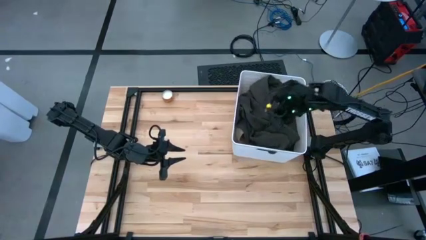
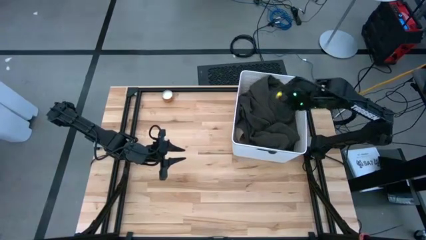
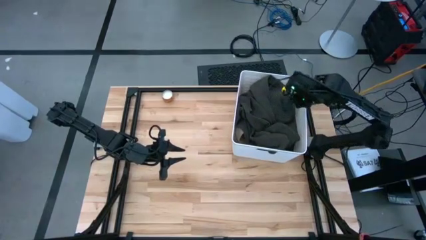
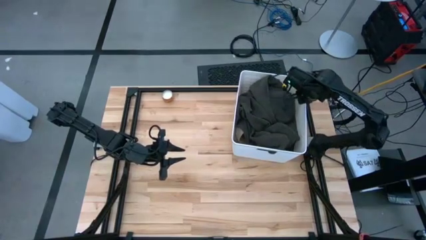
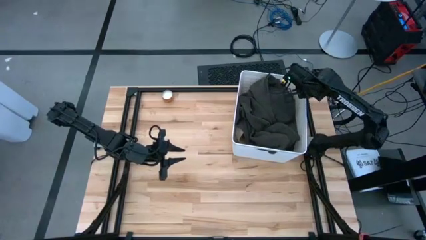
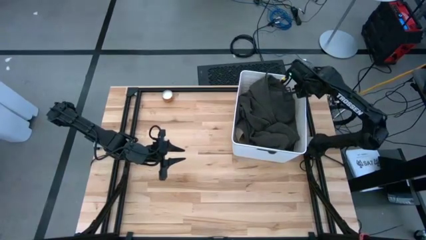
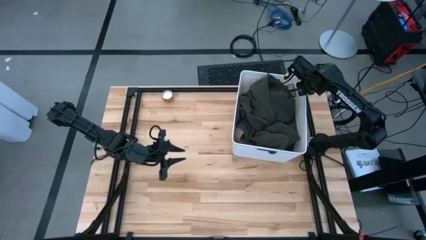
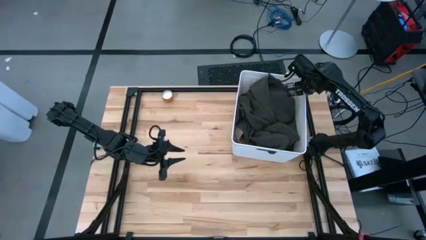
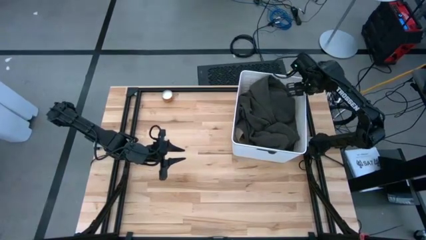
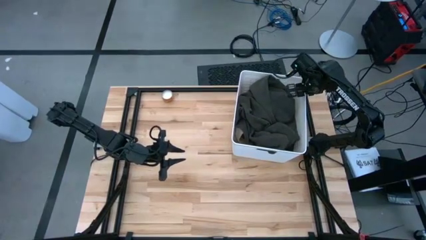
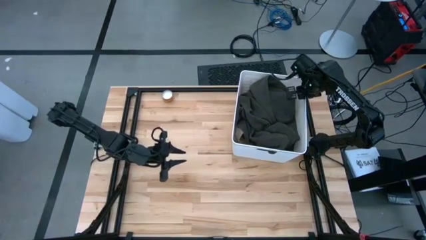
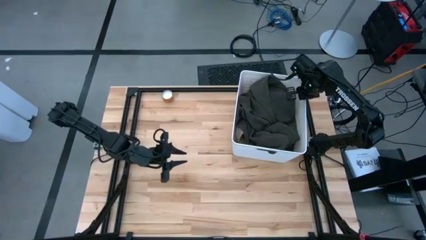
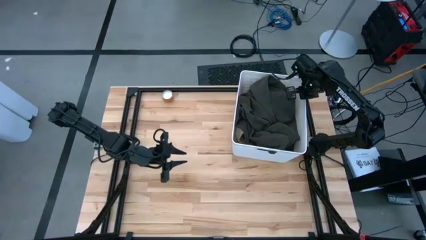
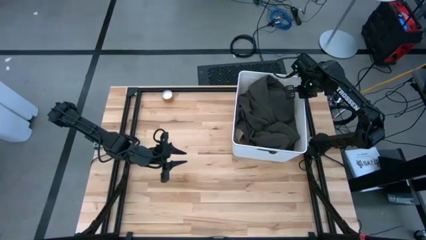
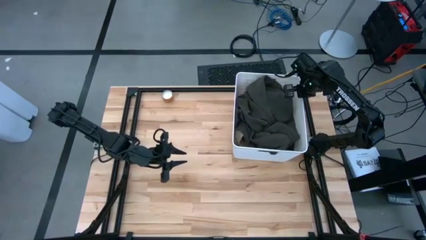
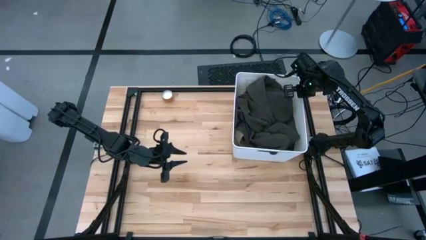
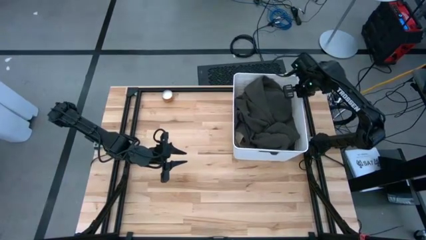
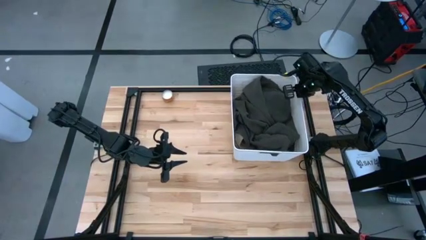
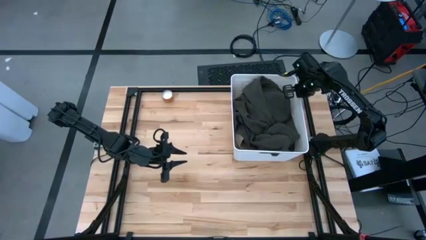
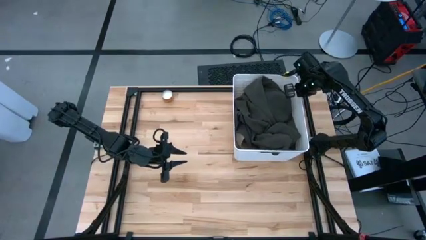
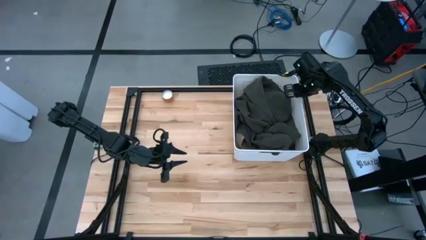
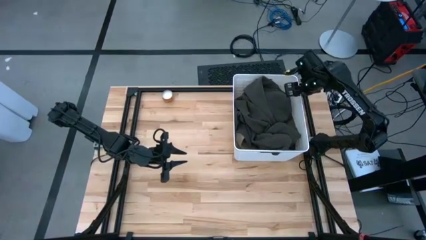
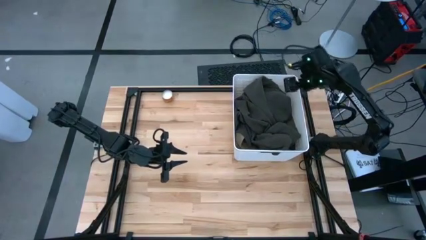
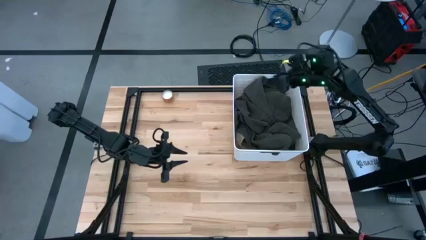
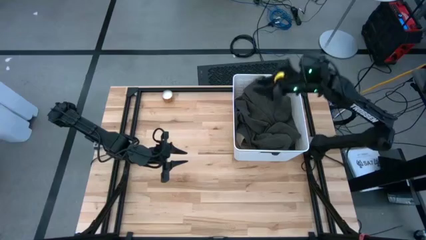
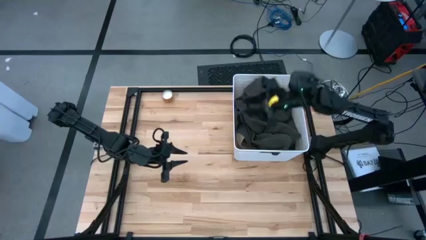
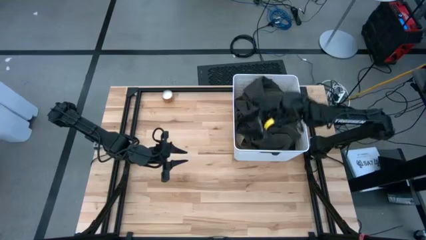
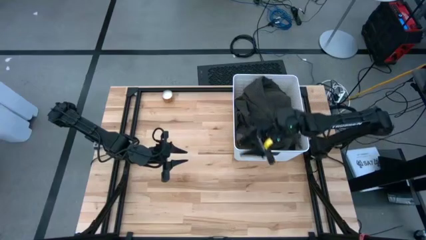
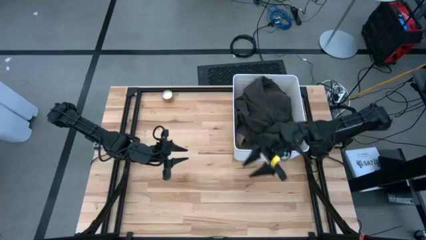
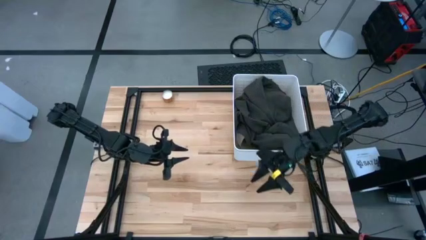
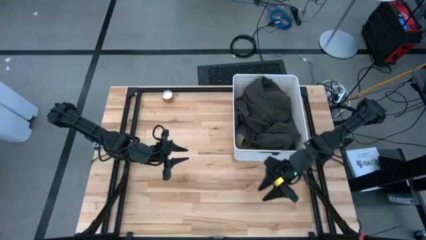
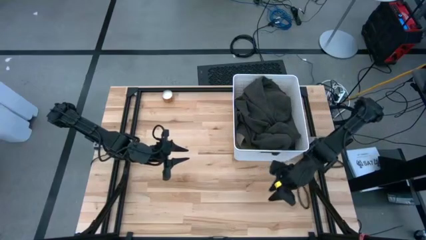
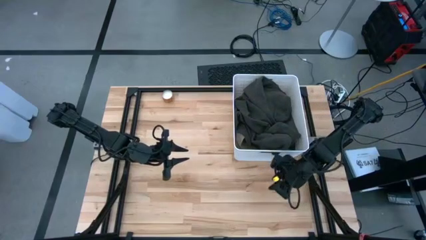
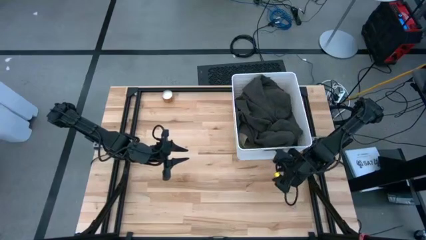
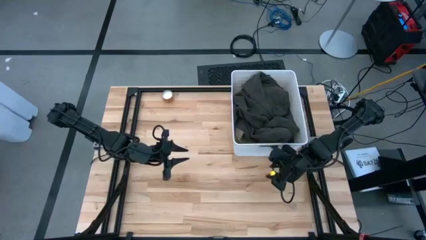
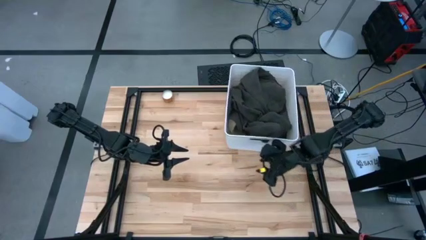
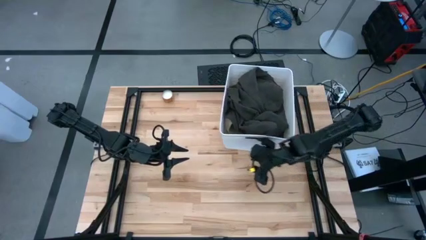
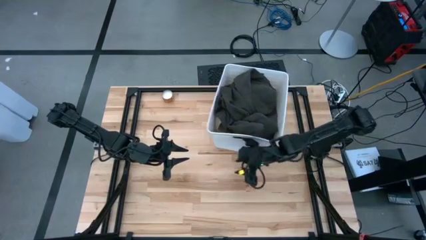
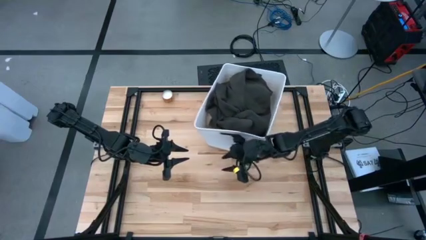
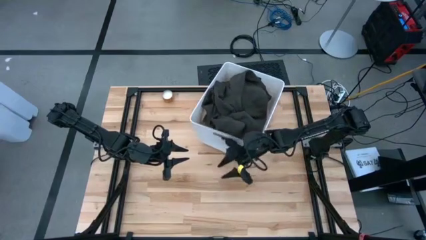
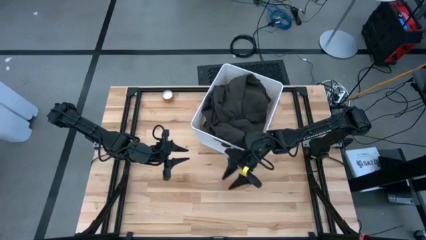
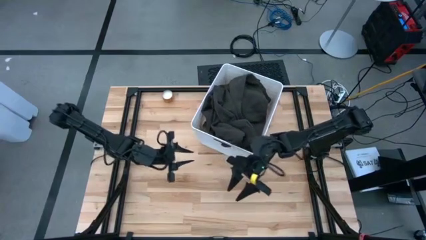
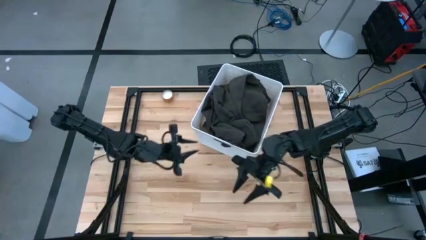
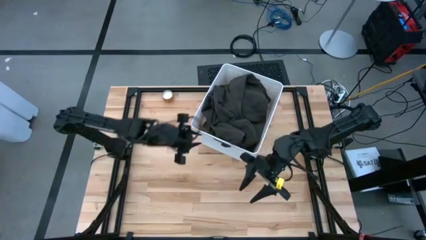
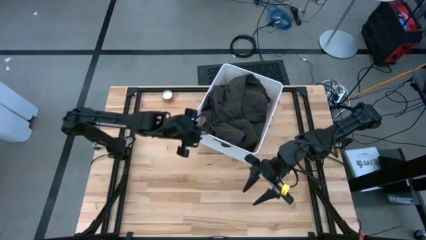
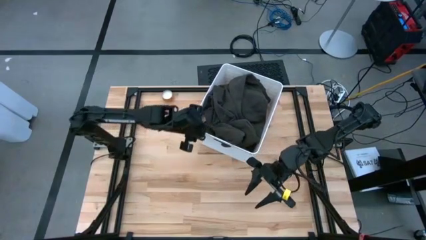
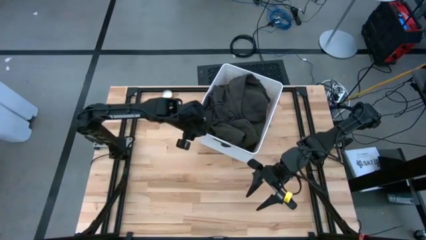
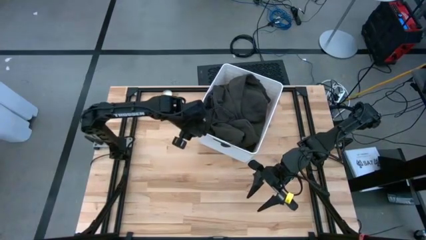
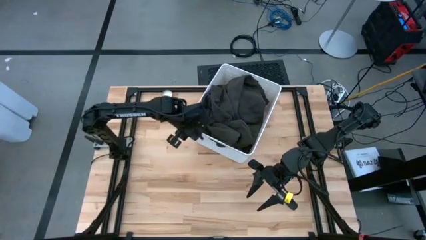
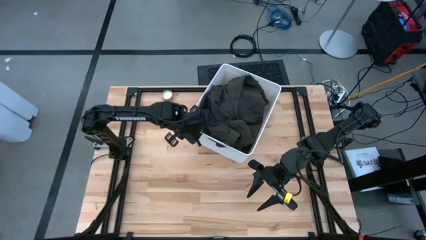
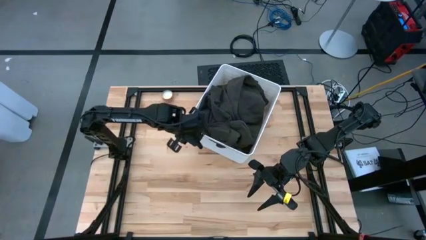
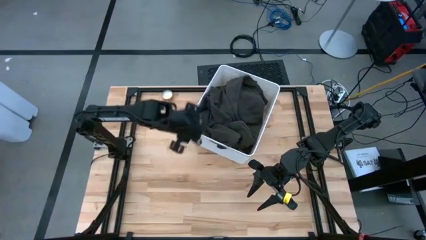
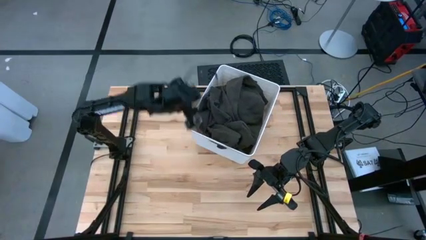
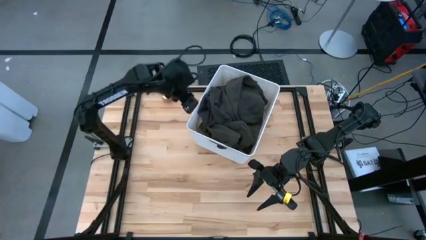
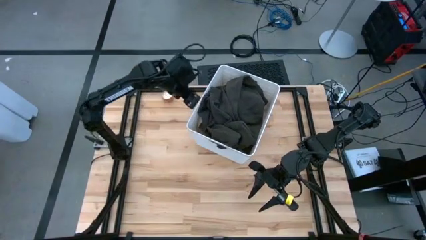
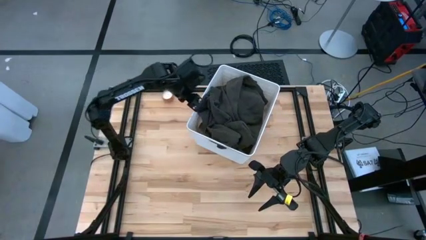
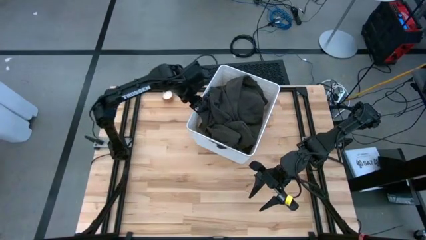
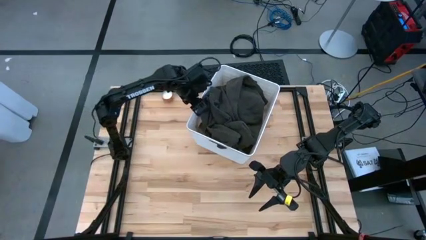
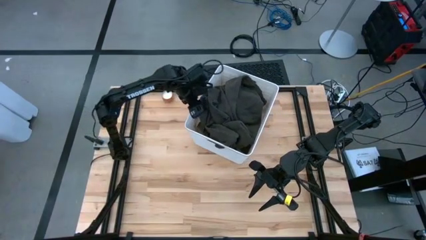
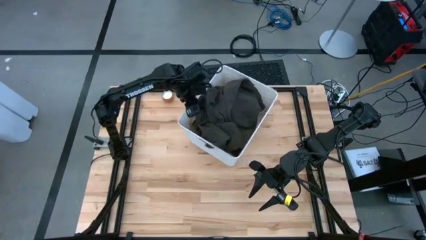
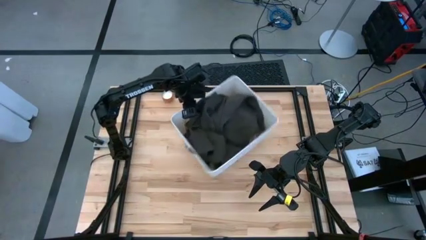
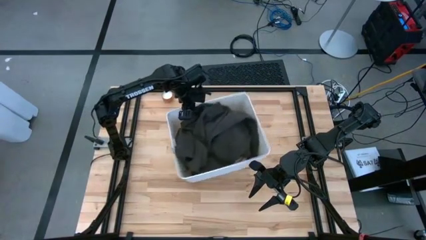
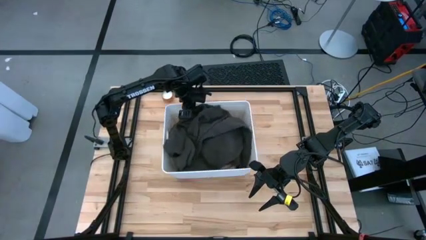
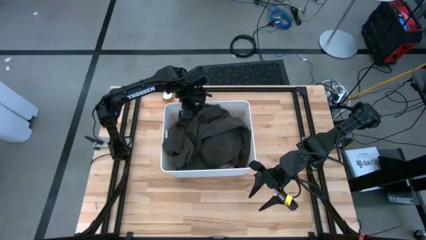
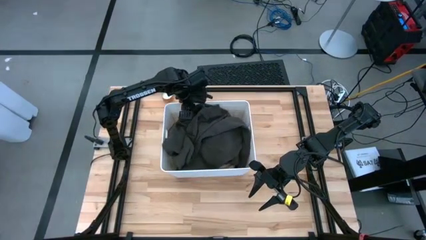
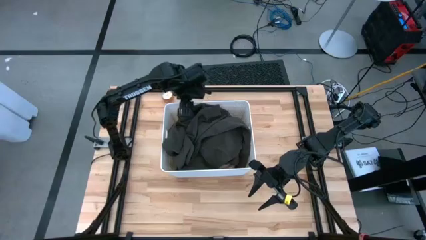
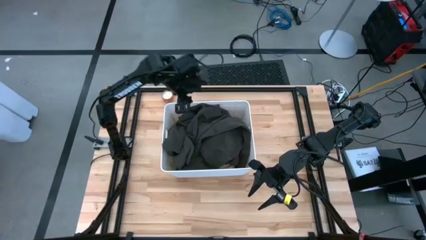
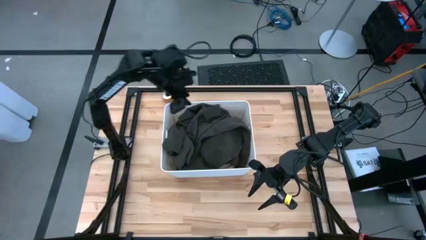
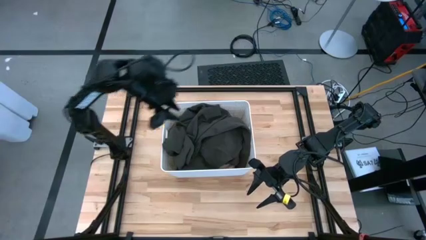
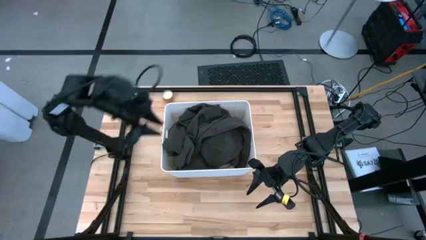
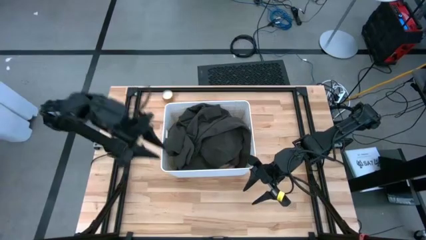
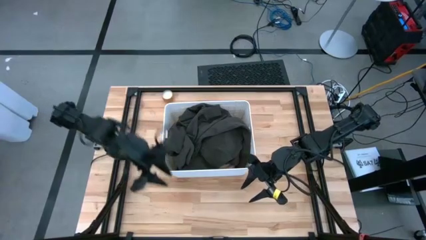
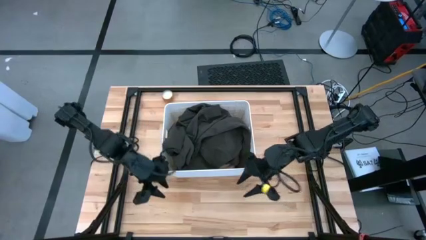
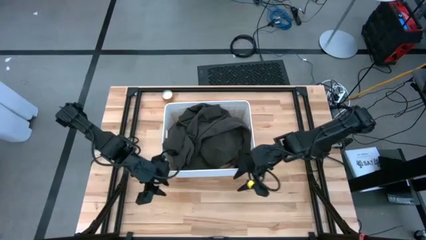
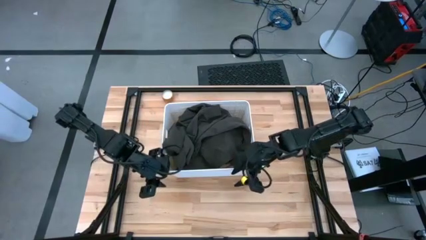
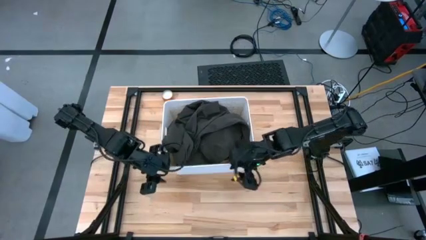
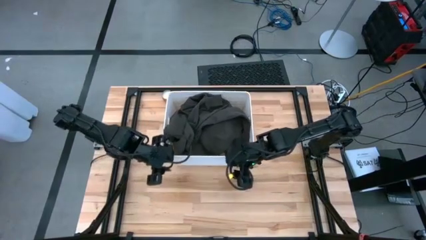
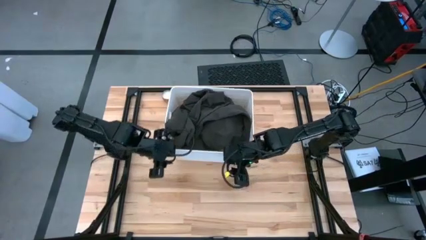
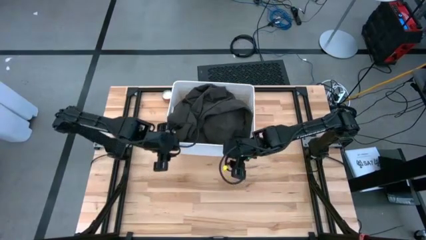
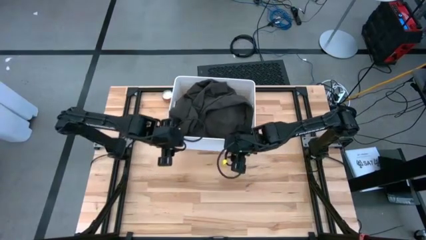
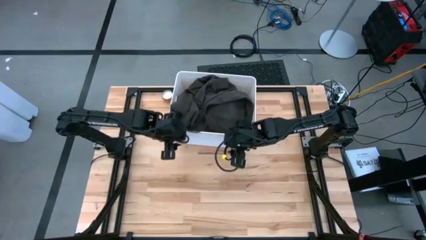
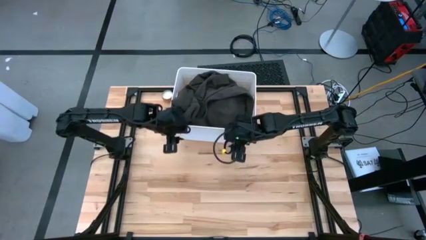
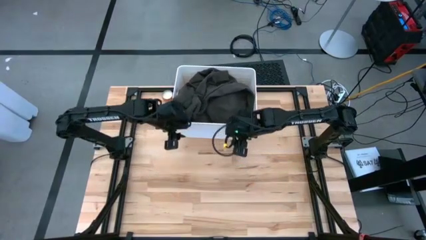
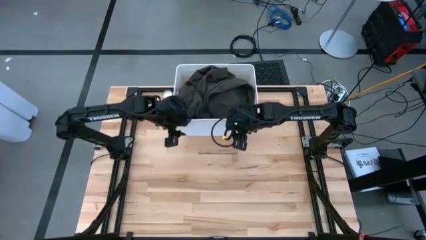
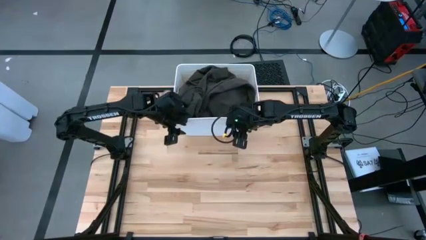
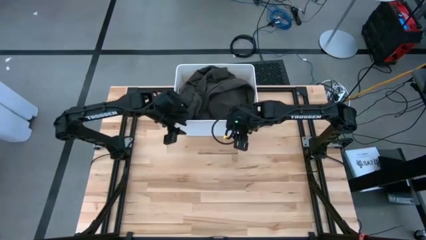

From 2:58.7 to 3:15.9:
Task: Sort clothes
Move the white laundry bin to the top middle of the table

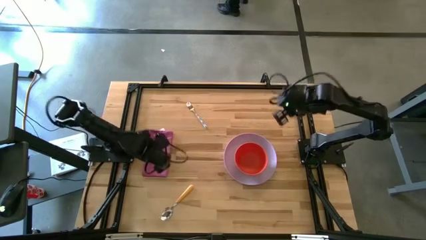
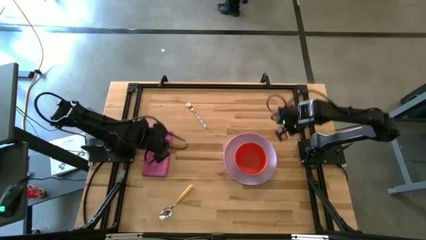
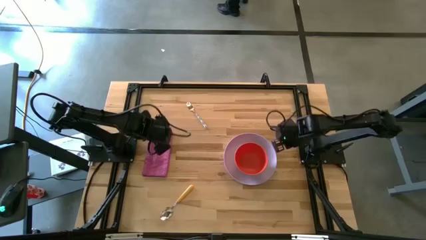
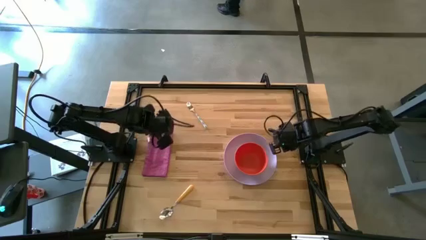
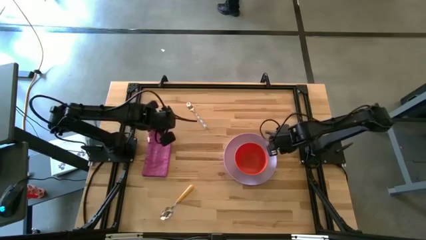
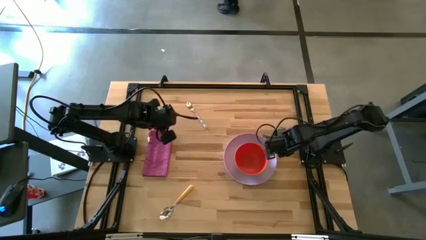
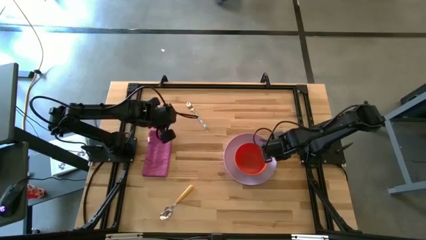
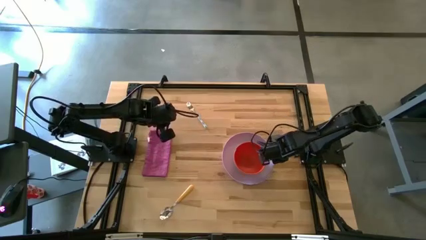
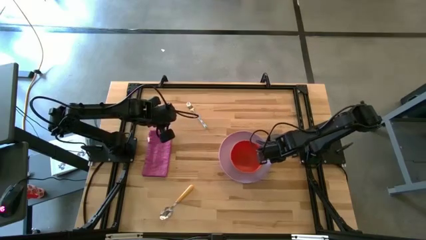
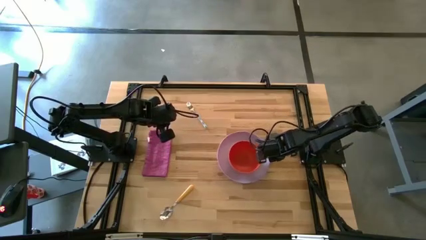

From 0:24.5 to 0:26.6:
Task: Set table place
Move the purple plate closer to the center of the table
